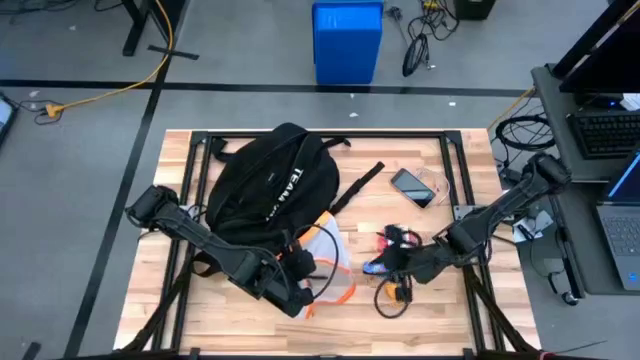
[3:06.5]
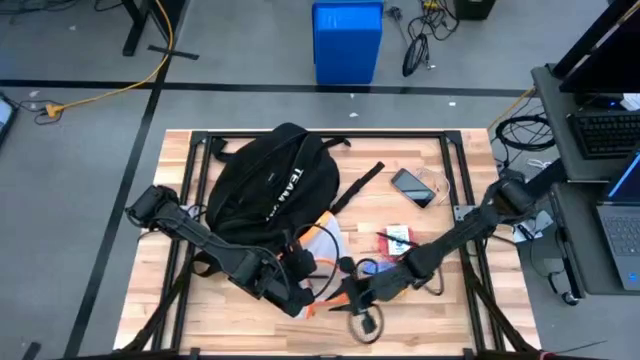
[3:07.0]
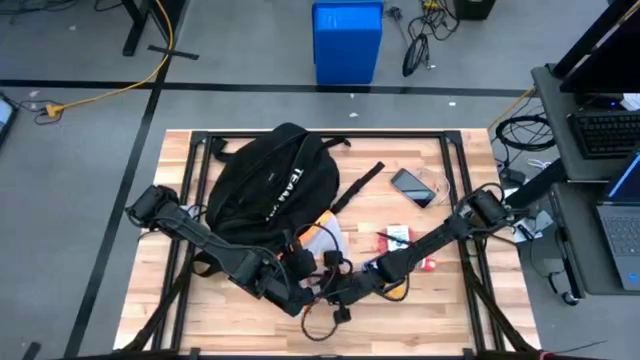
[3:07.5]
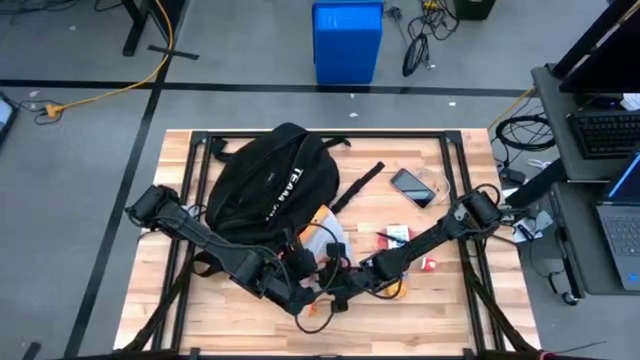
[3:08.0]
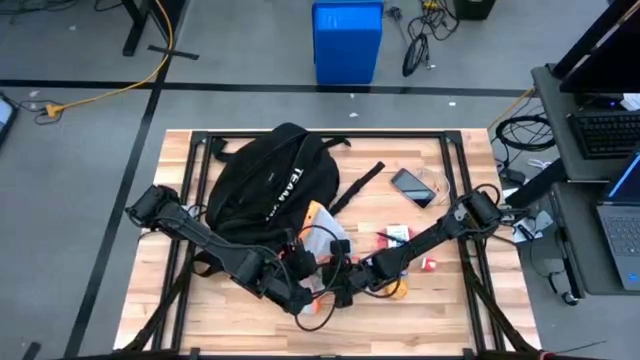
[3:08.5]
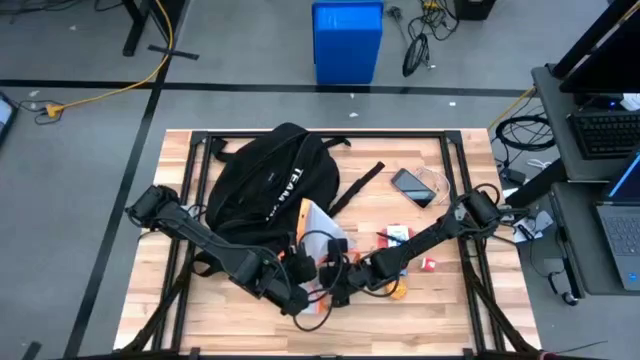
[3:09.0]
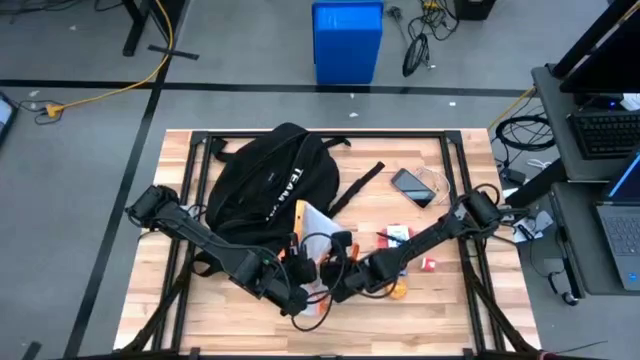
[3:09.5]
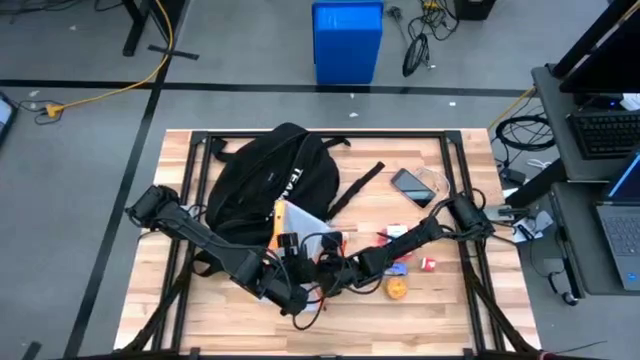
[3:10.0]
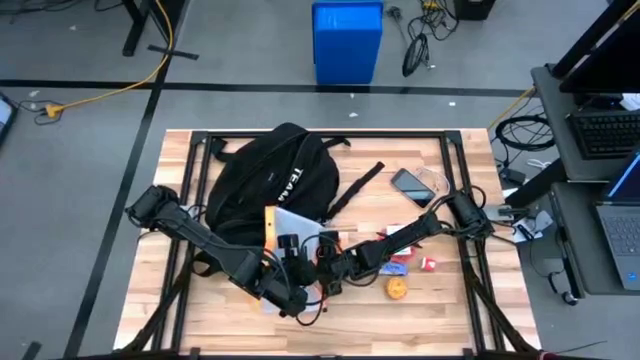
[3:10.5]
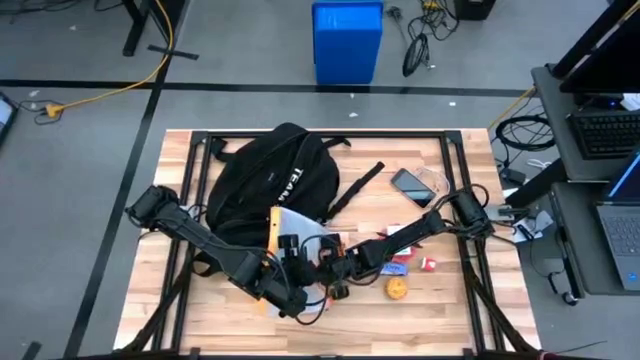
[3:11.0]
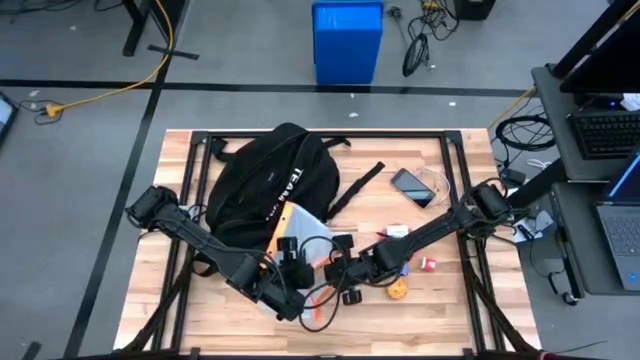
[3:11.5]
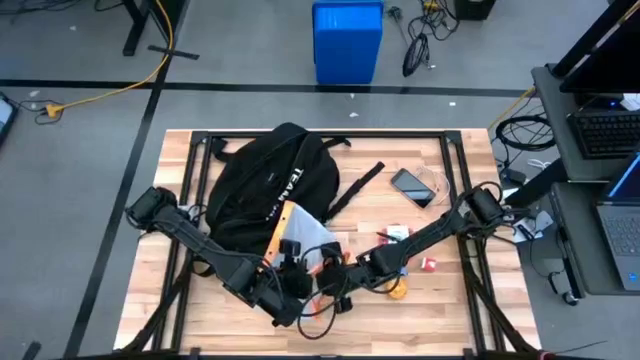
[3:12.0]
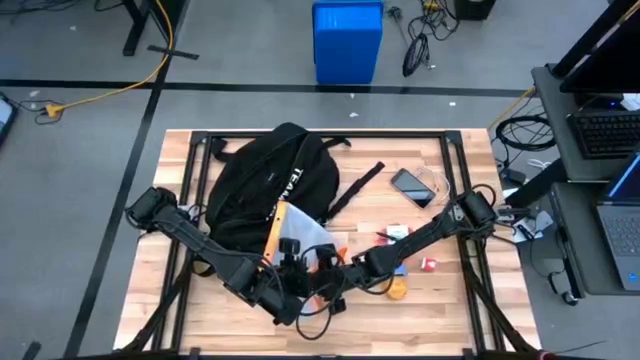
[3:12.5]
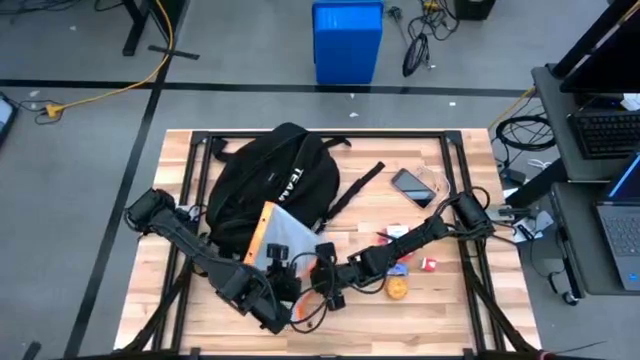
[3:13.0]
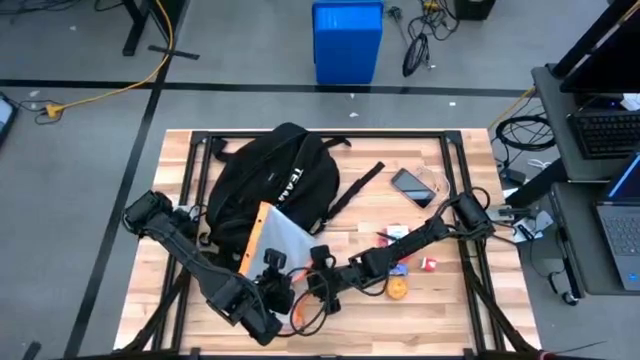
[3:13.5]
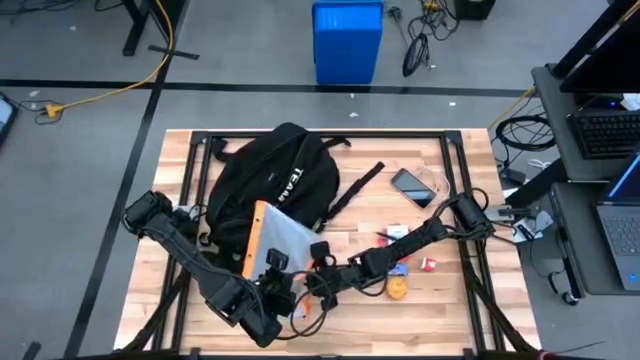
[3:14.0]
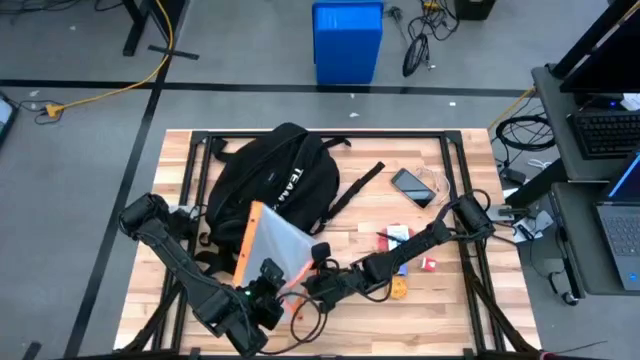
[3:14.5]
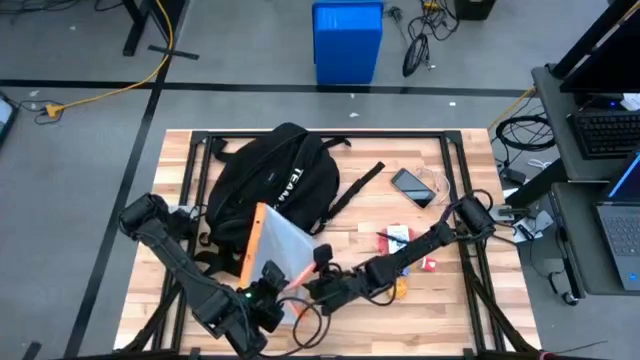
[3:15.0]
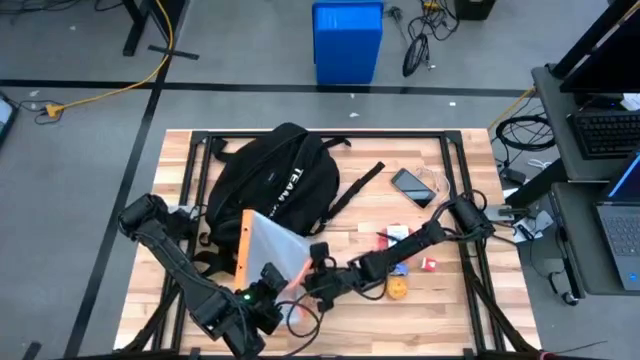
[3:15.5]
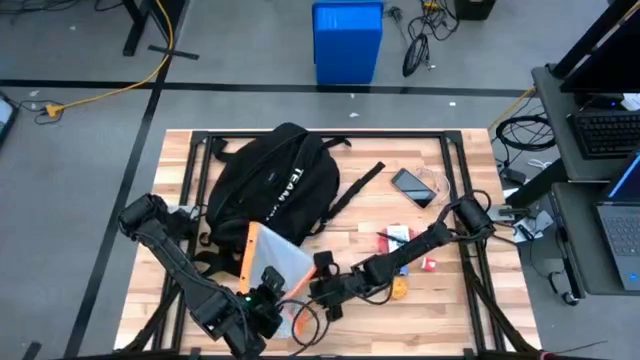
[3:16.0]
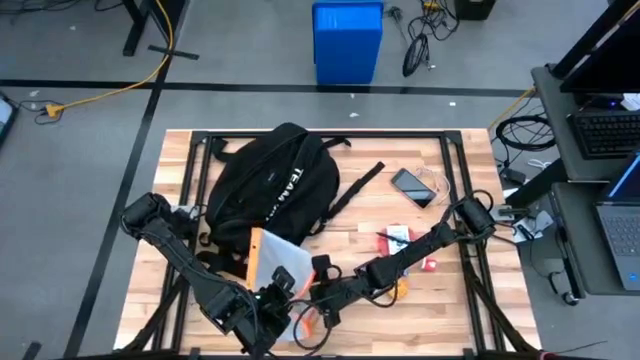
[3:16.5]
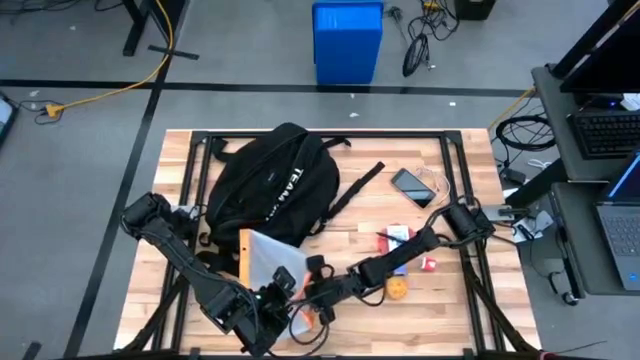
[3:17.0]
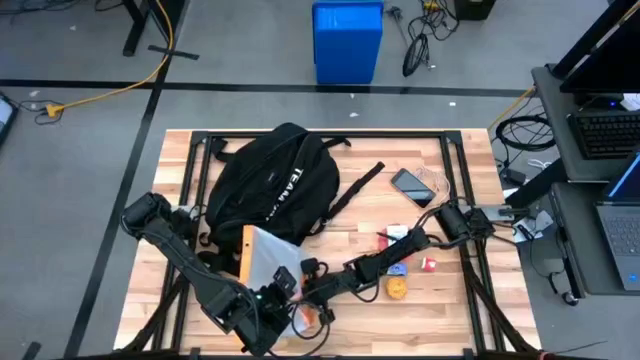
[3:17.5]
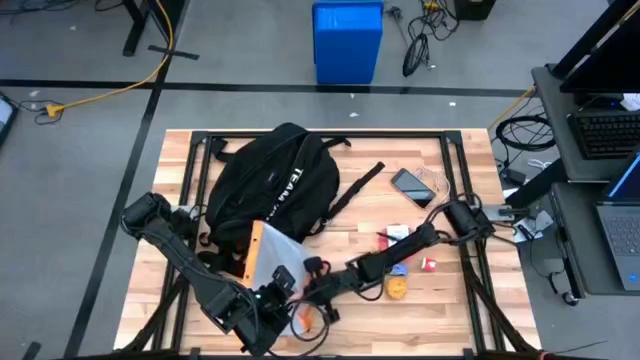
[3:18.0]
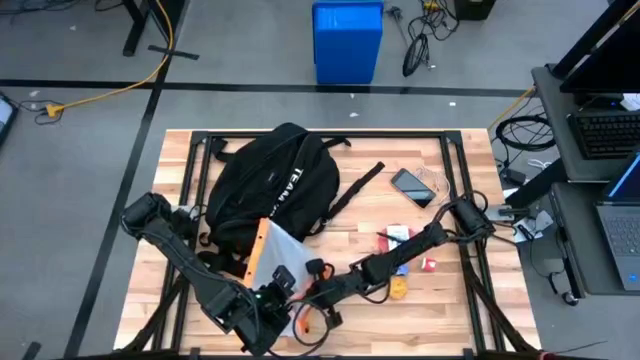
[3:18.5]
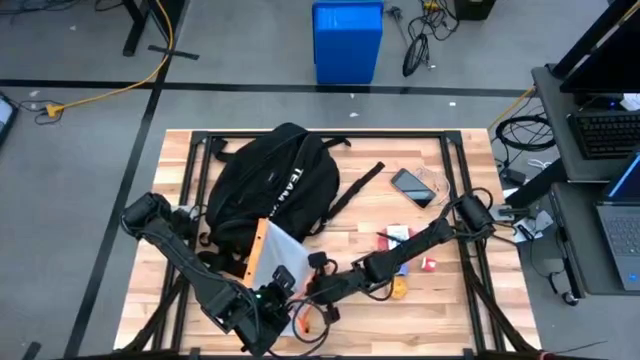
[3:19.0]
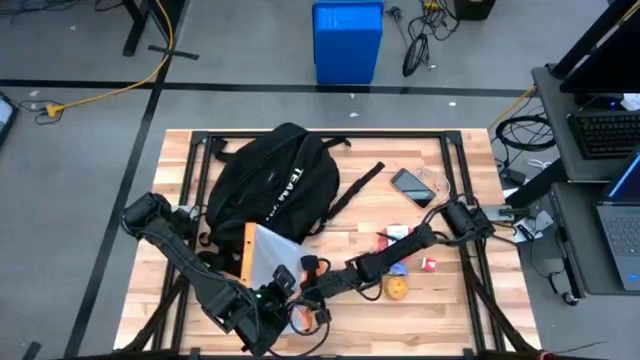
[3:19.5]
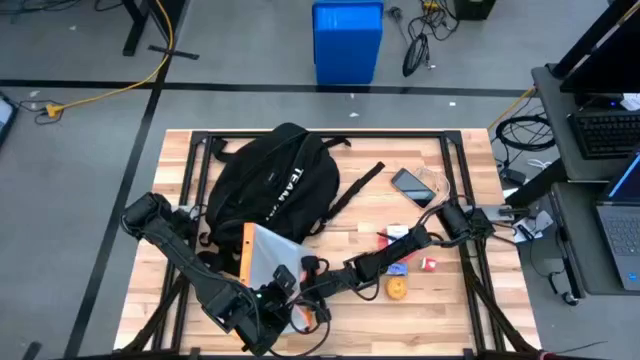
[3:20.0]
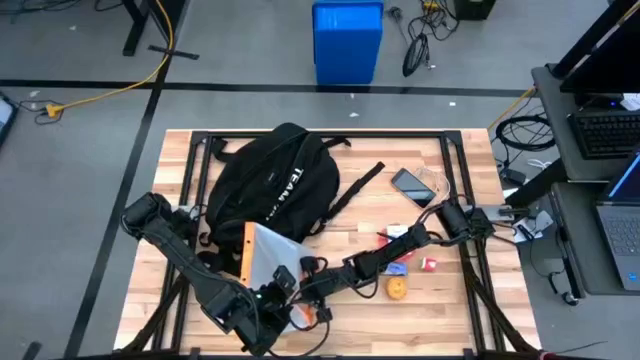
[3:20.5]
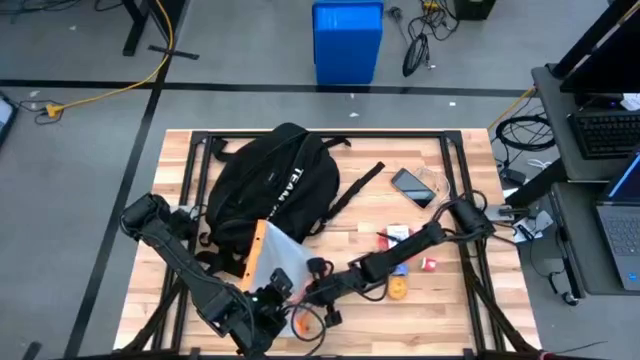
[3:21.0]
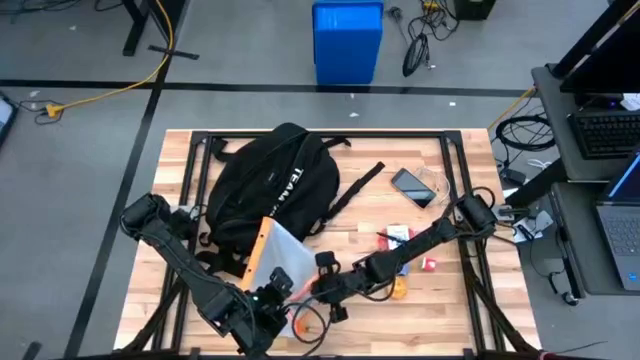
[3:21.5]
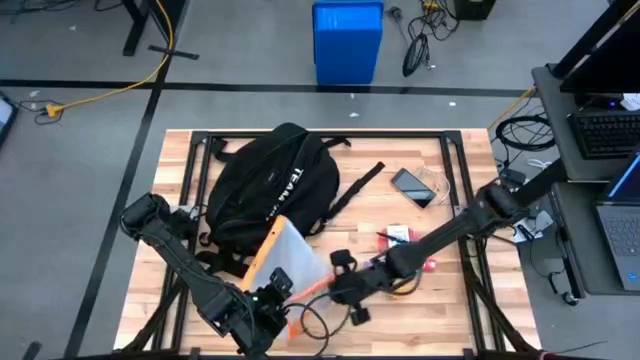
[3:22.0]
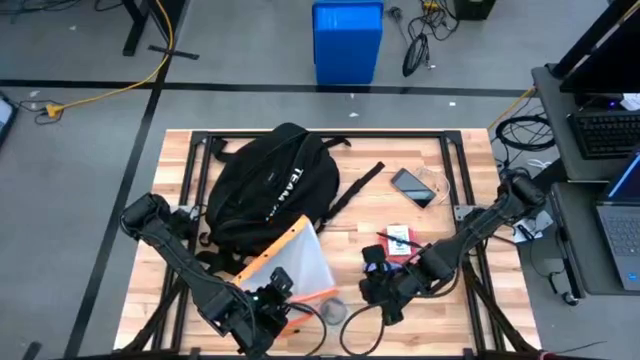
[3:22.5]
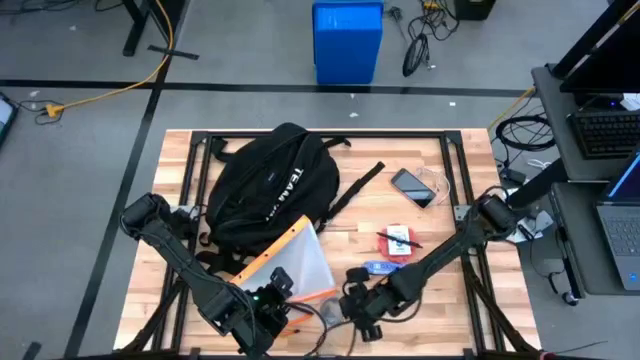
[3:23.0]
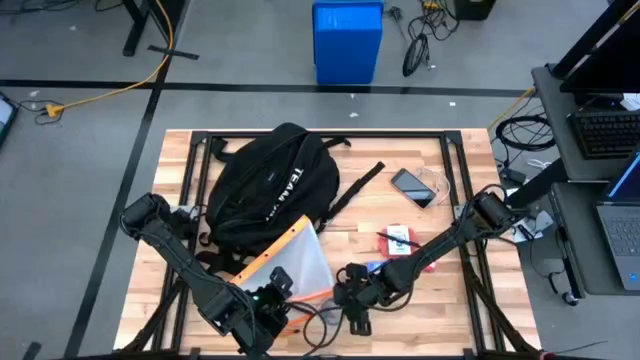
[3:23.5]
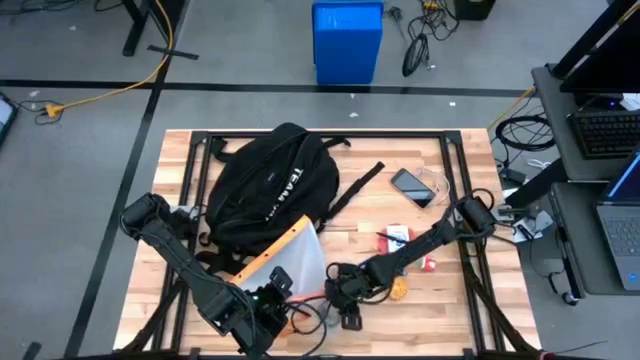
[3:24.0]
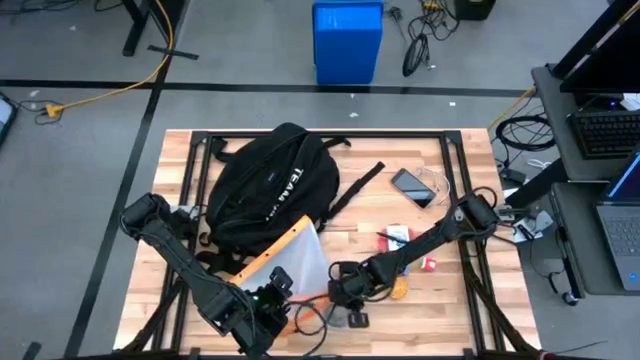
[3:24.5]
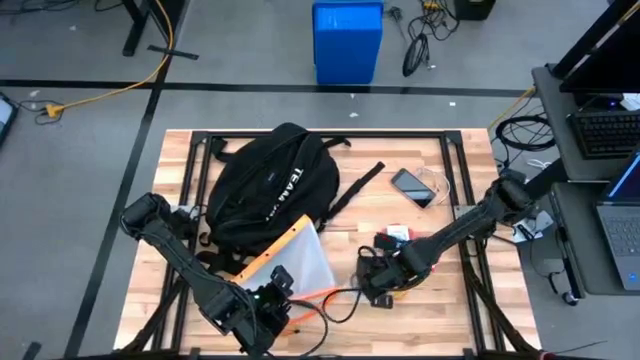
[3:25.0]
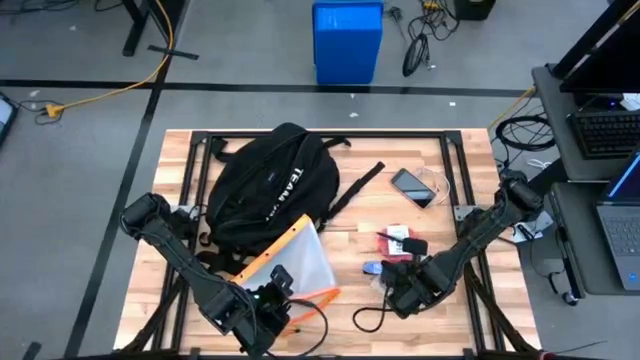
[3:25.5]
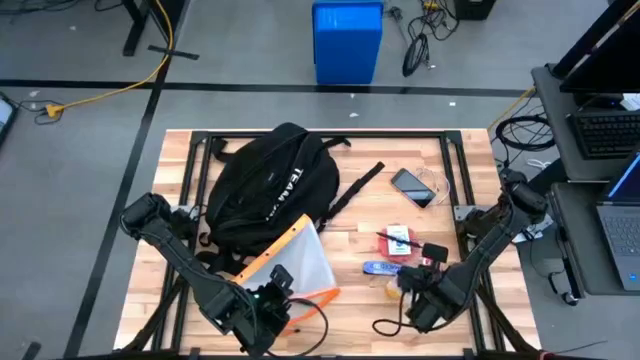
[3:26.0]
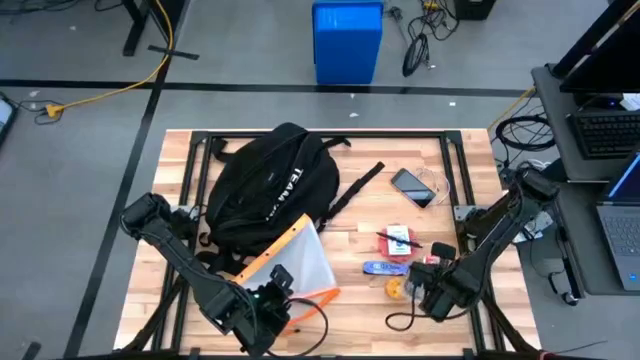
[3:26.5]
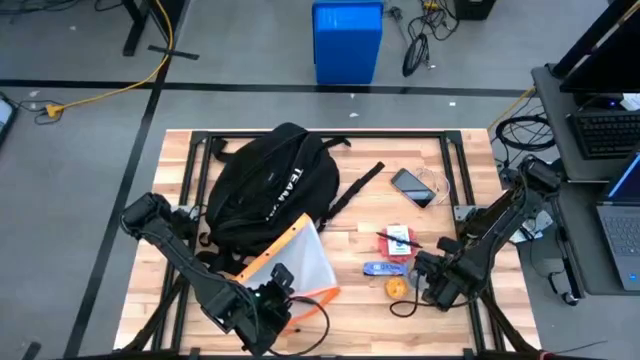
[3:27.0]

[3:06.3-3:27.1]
Task: Unpack backpack
Remove the earphones from the orange zip bag

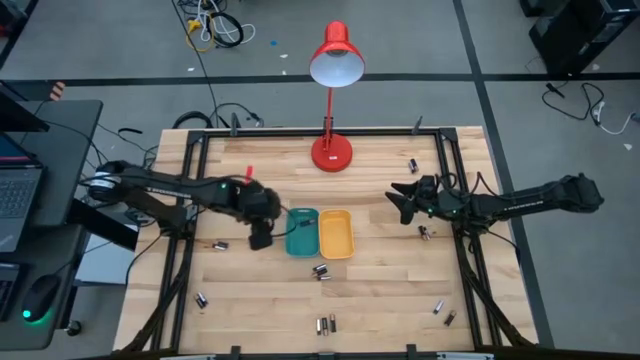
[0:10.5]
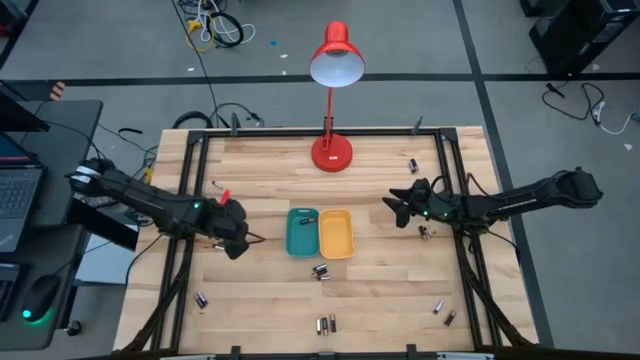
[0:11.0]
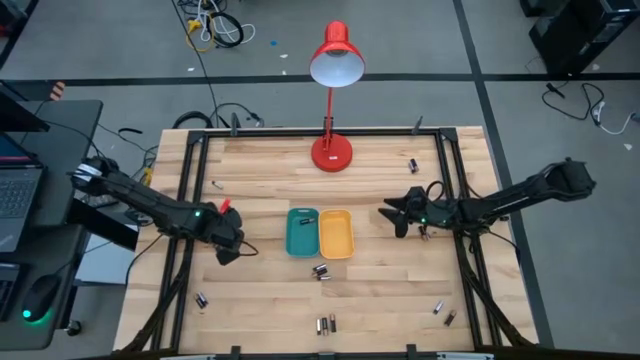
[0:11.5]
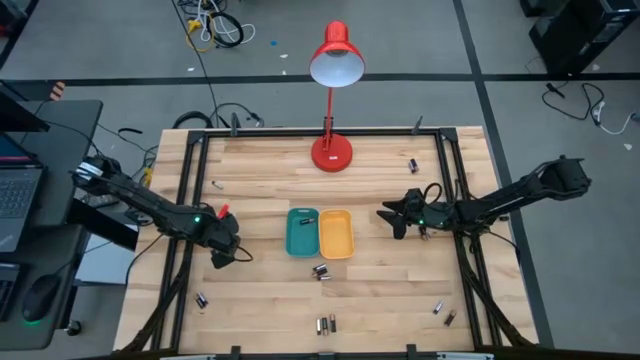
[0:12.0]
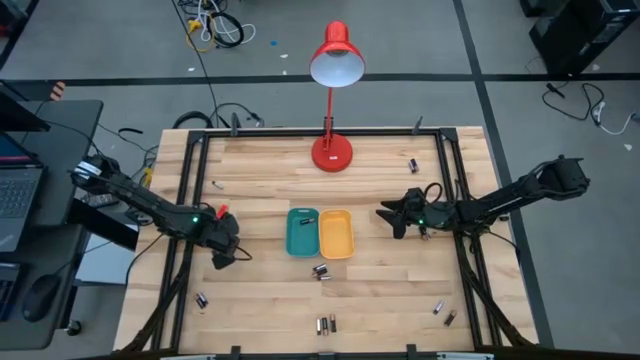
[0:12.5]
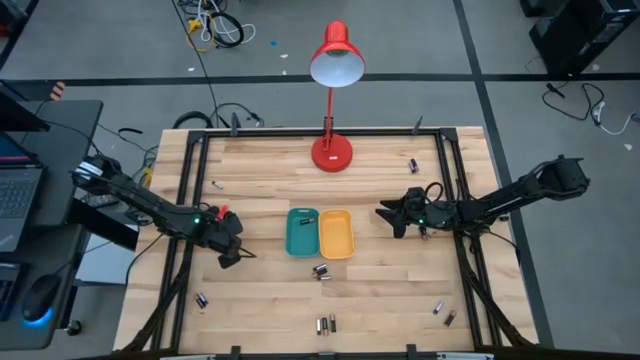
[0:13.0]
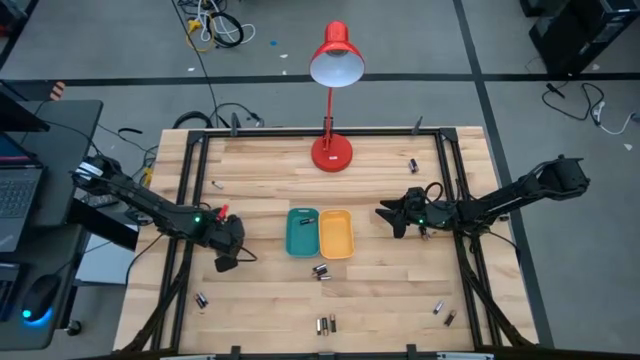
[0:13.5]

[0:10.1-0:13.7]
Task: Sort batteries
Put the black battery into the blue bin
